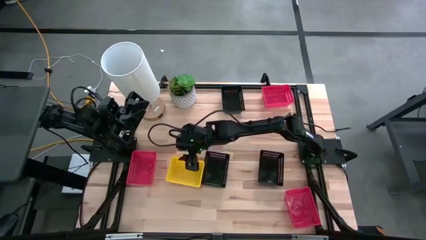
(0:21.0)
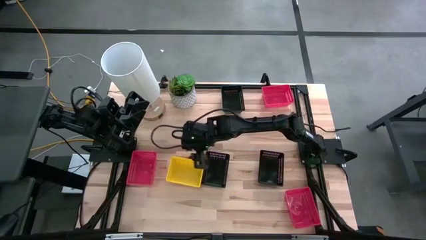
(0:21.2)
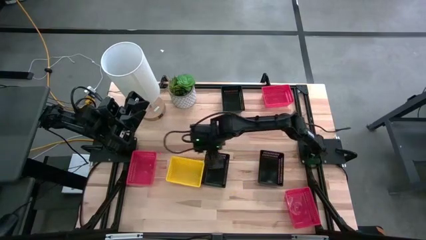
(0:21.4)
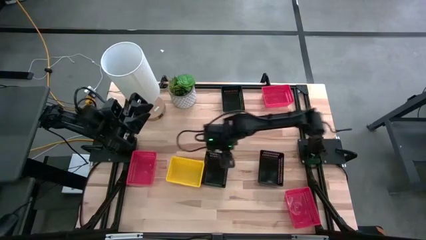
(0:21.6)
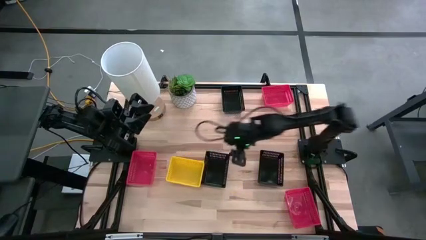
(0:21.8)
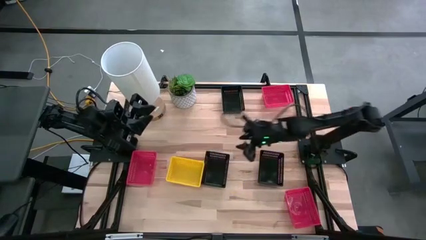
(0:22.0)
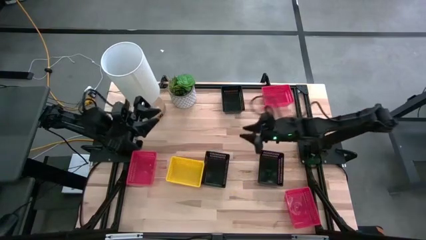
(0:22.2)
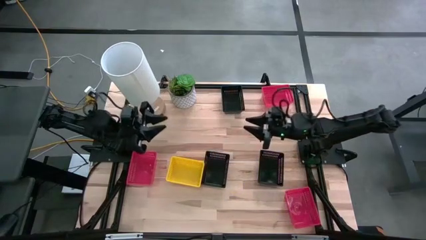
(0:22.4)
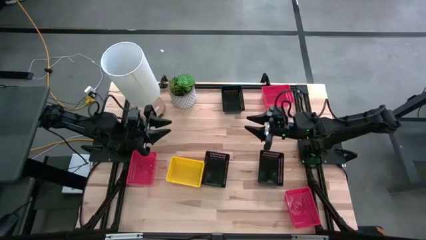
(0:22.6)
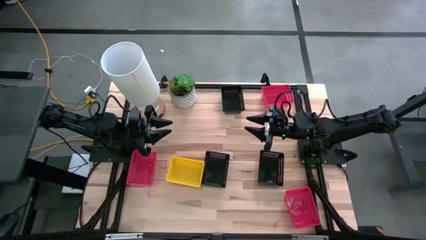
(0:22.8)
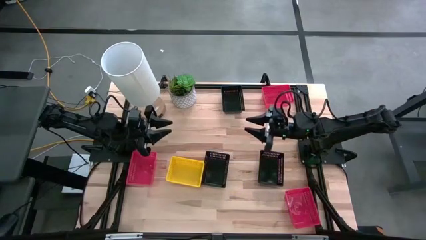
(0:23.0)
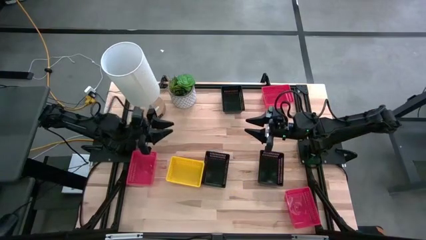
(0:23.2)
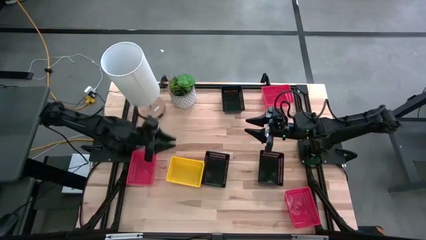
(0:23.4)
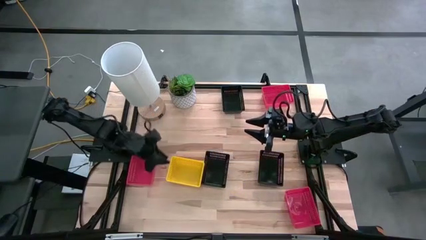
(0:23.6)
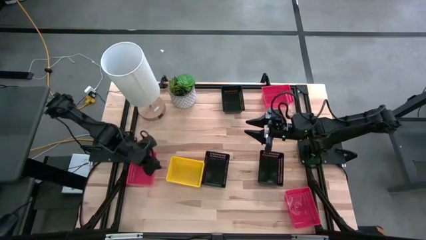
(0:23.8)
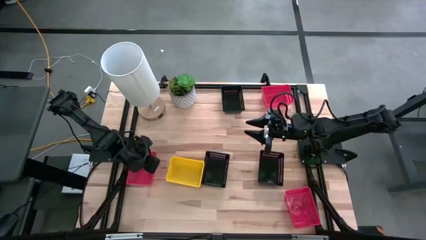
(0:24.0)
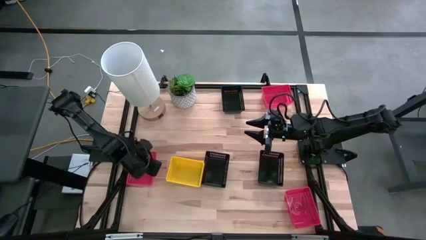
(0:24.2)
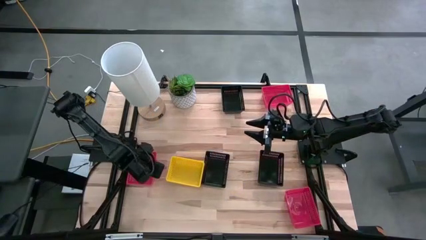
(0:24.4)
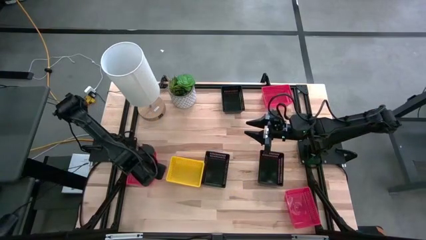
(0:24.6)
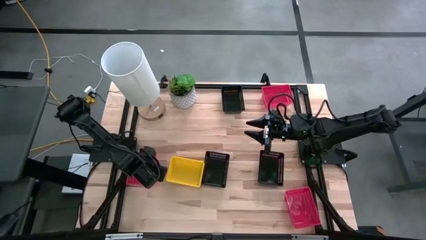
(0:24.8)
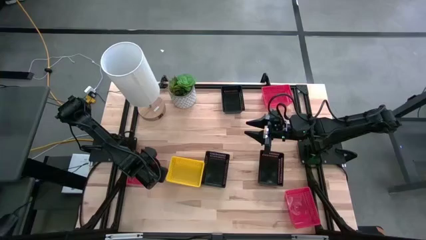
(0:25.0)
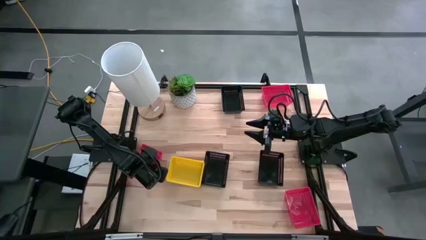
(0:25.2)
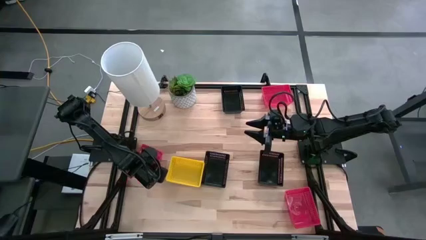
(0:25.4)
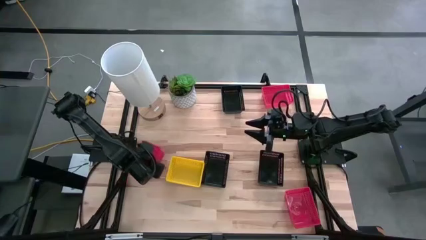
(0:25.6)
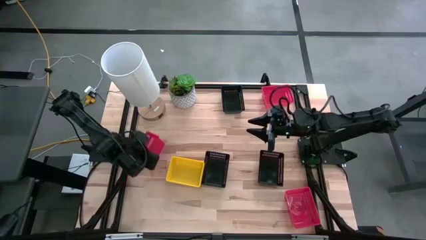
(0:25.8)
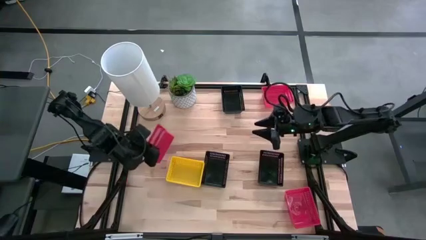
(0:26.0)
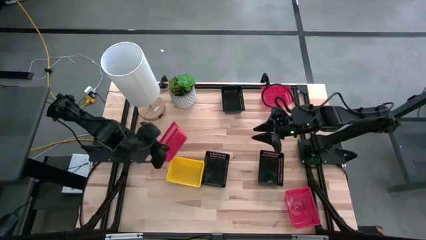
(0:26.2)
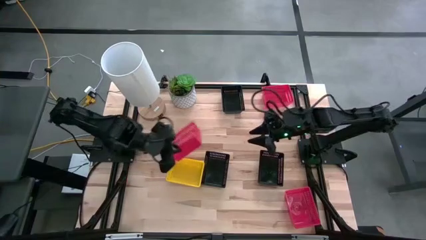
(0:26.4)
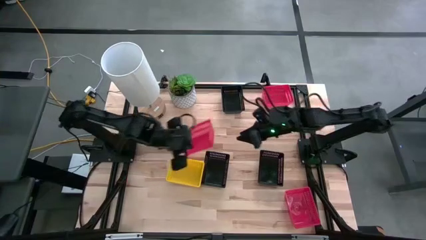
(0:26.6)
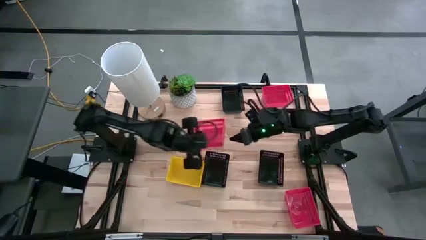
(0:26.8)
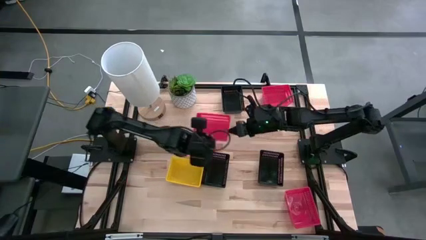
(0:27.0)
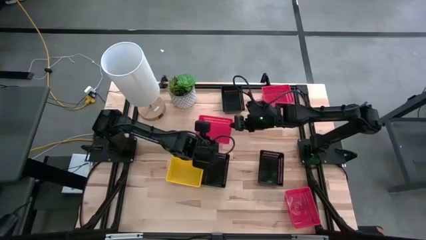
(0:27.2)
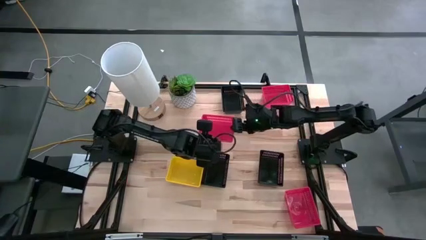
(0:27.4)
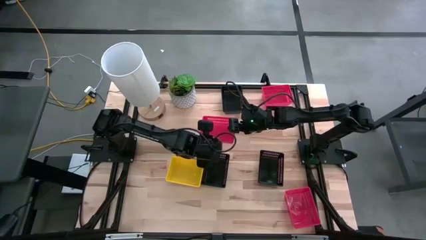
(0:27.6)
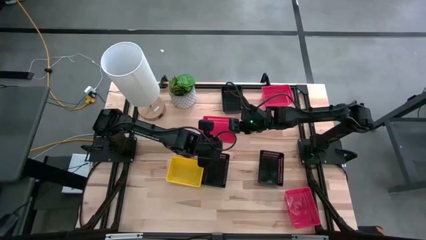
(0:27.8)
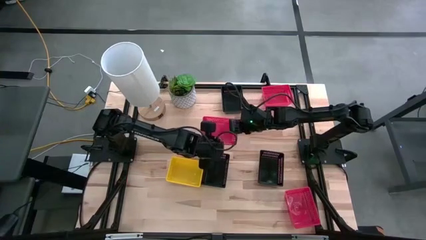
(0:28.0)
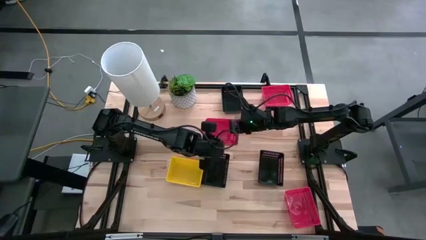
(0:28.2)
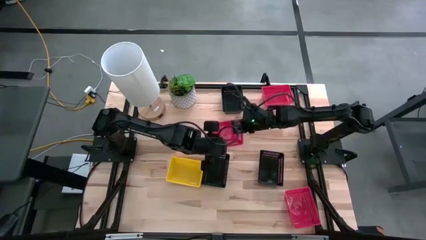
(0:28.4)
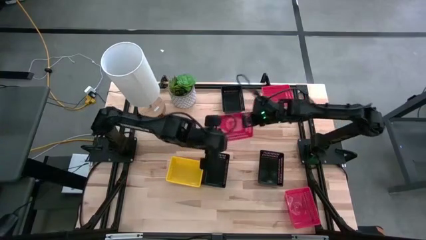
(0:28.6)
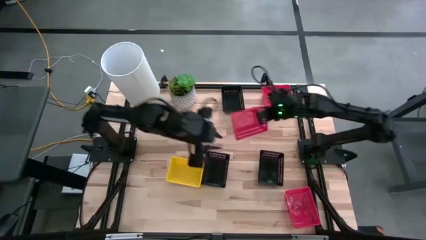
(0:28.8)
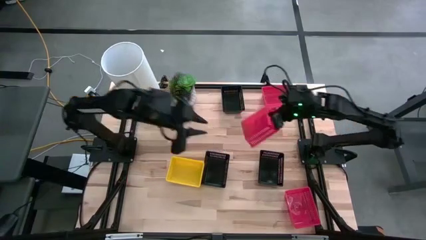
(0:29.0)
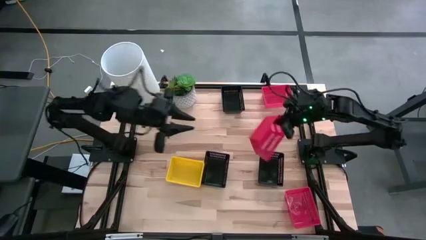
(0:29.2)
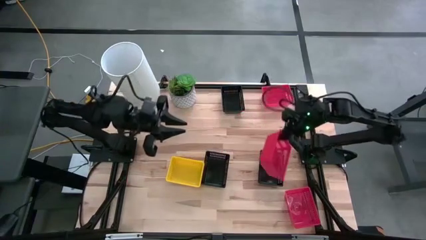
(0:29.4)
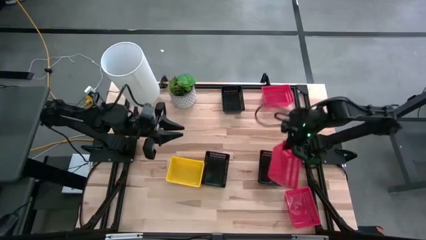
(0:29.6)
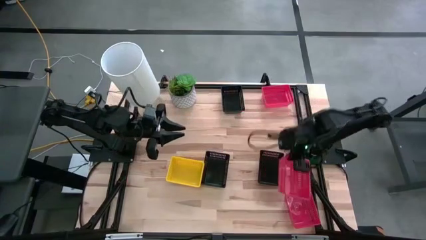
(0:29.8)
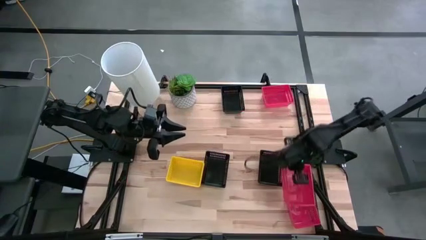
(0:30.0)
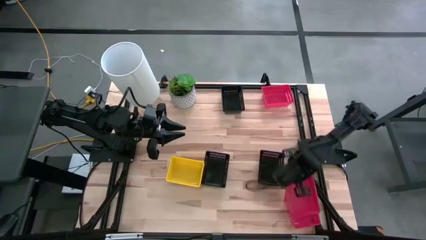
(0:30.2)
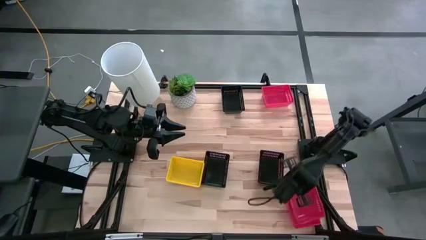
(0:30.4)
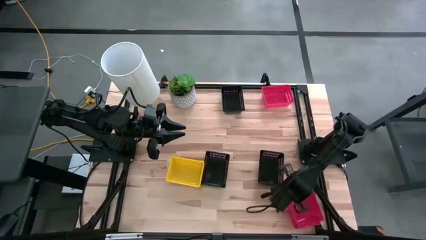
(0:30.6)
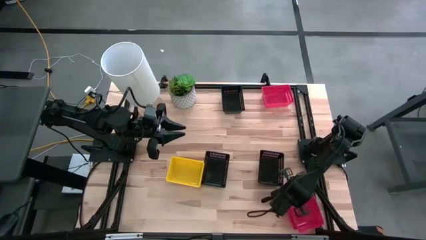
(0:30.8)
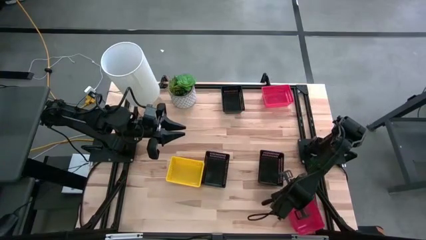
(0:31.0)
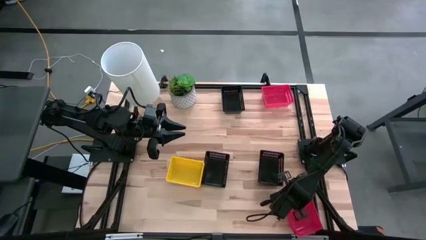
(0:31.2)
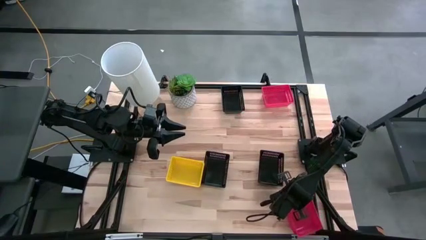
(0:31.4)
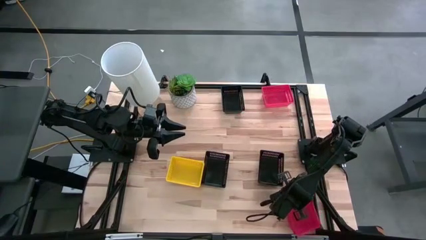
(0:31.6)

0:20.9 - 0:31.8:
Stack the middle red bin on the bottom red bin

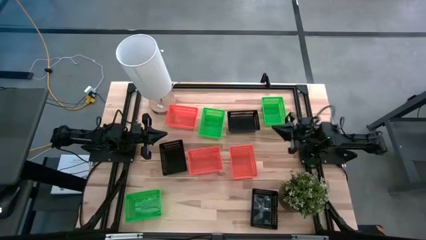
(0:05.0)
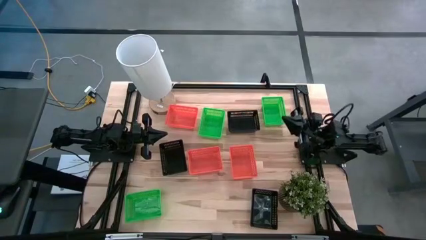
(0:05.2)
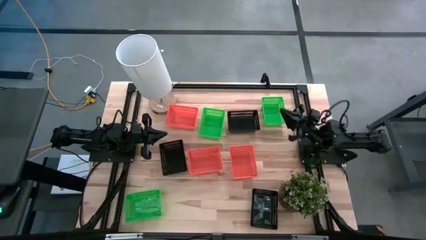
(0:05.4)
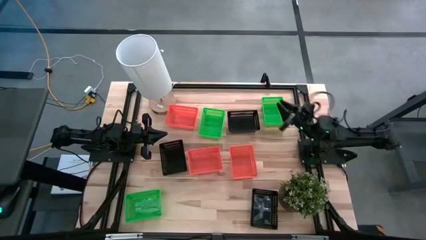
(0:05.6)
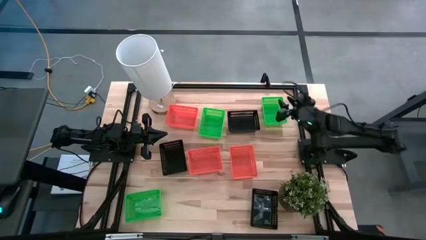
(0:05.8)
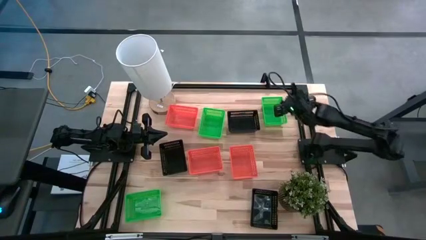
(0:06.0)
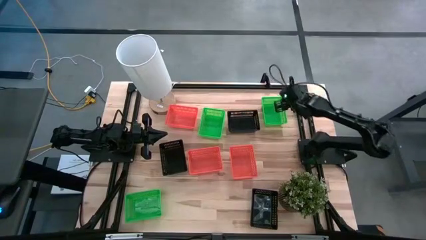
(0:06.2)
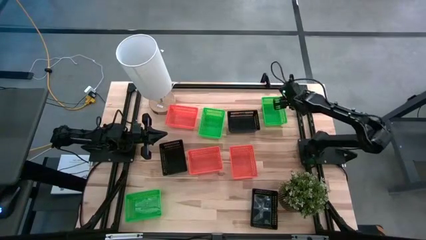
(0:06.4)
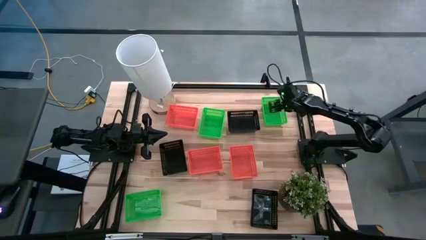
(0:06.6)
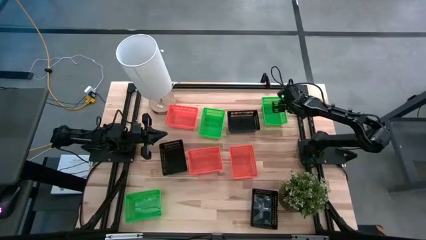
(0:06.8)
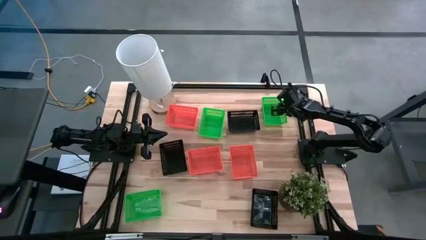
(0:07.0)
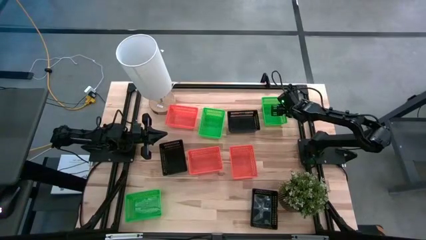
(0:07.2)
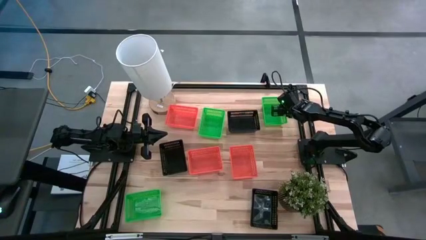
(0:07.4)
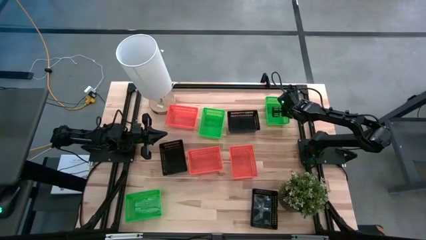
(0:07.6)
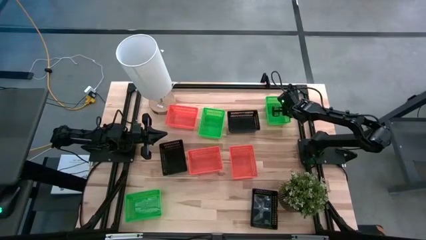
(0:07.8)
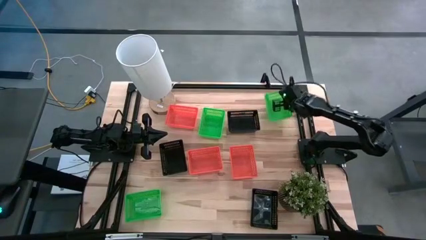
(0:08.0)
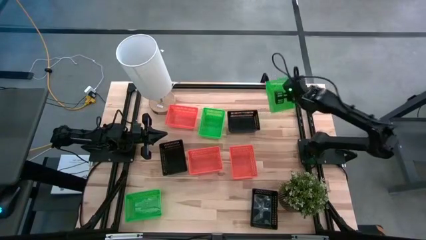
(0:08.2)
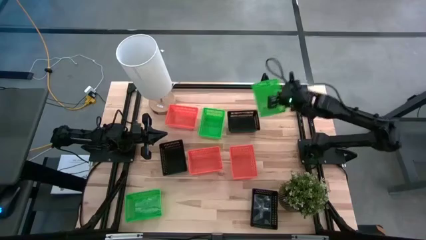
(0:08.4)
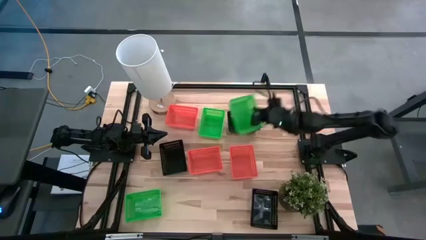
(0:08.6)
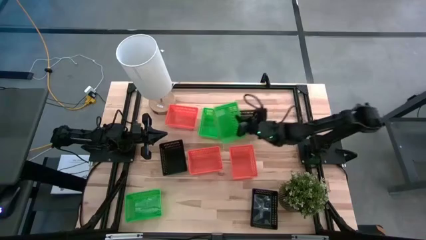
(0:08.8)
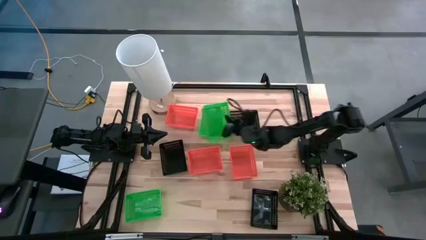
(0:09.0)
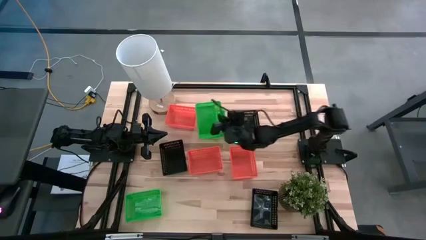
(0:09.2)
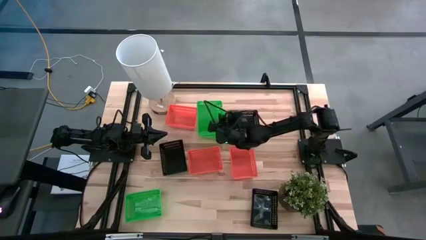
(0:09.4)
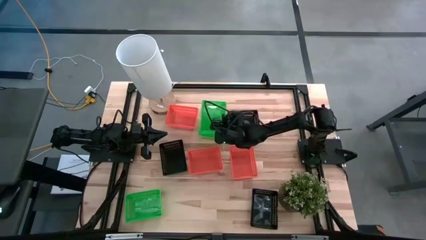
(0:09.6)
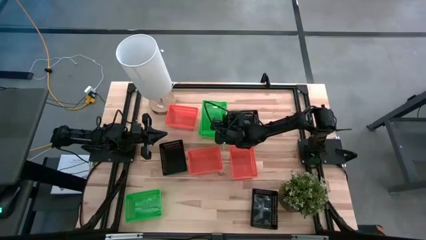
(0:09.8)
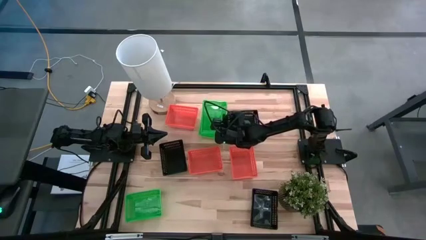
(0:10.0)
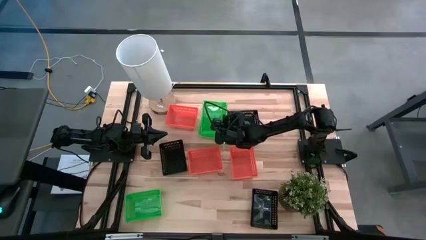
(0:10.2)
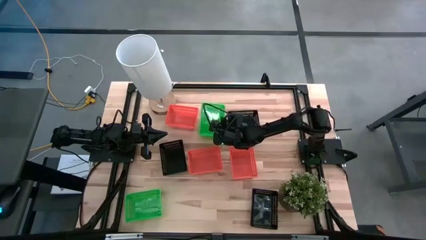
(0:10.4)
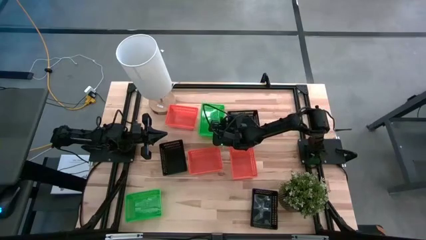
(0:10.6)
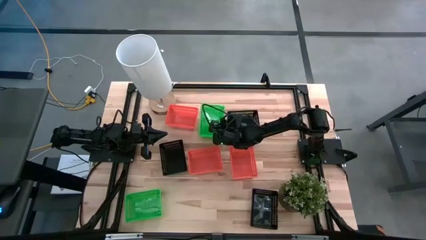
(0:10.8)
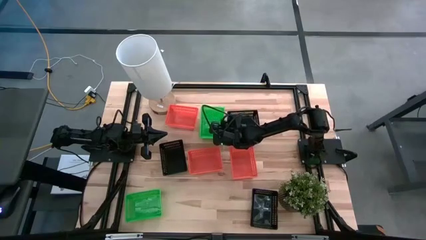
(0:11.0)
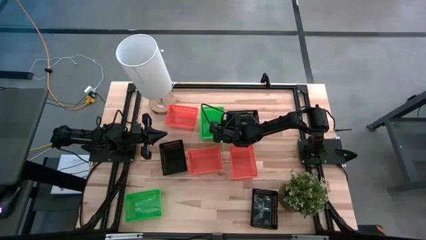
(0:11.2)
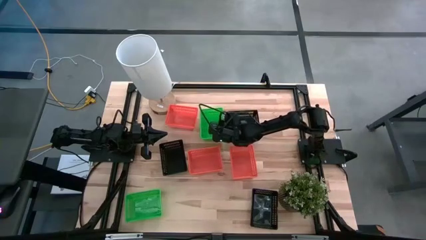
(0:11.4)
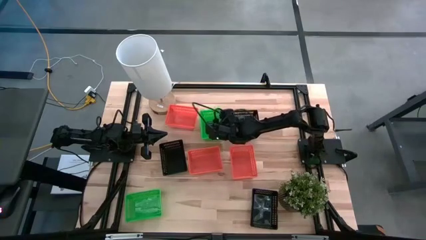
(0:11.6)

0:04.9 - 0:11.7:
Stack the top right green bin on top of the top left green bin
